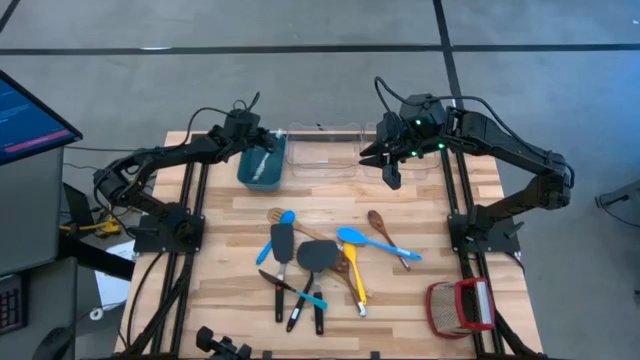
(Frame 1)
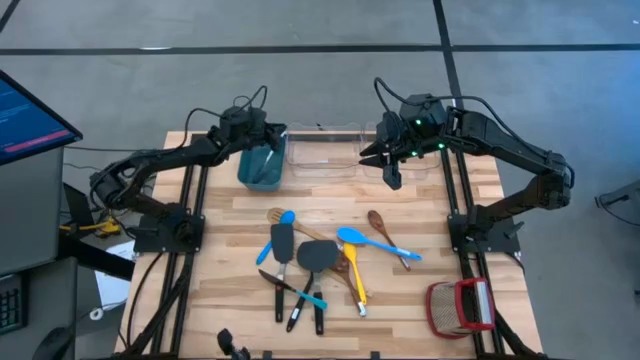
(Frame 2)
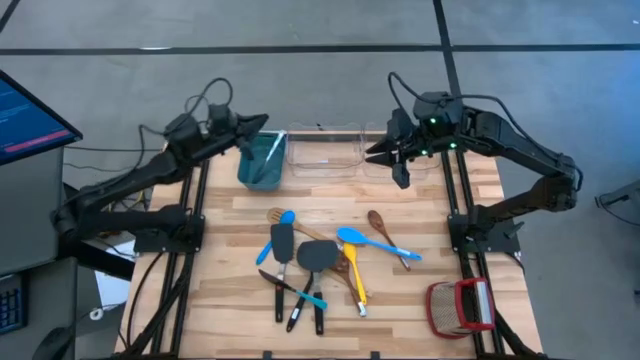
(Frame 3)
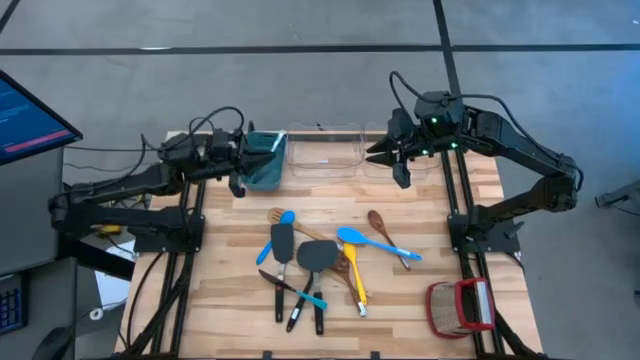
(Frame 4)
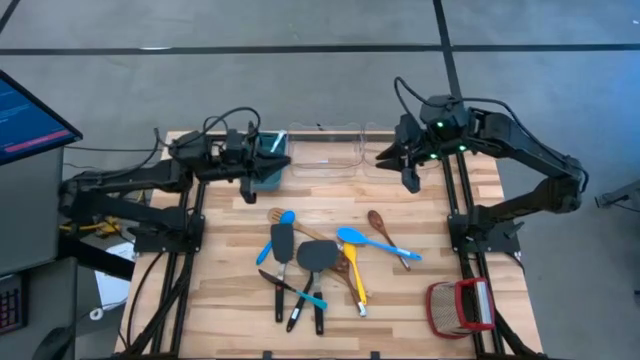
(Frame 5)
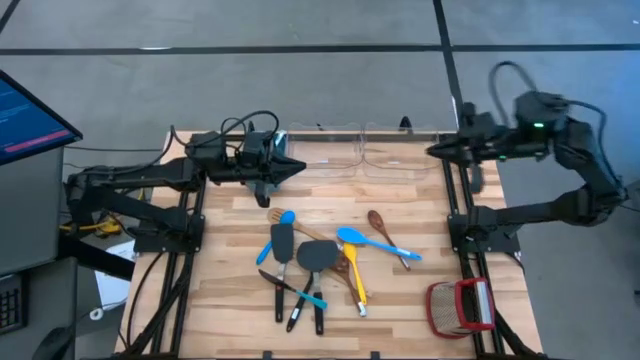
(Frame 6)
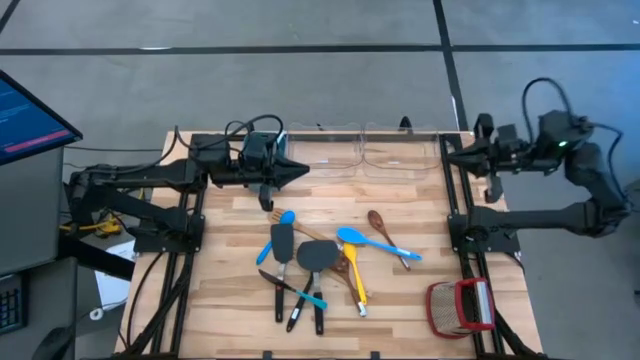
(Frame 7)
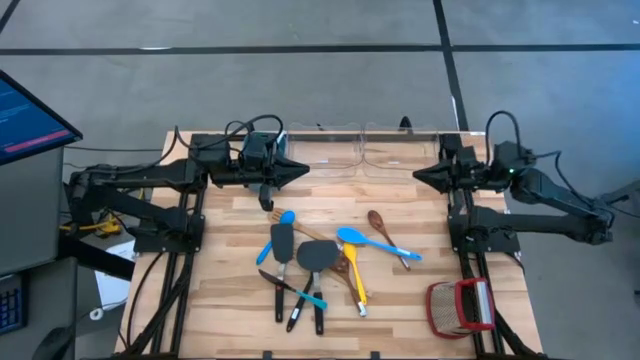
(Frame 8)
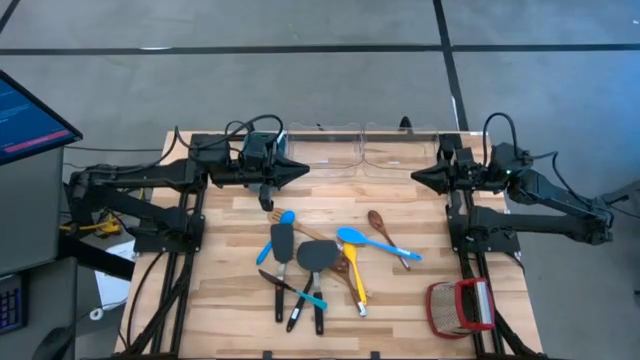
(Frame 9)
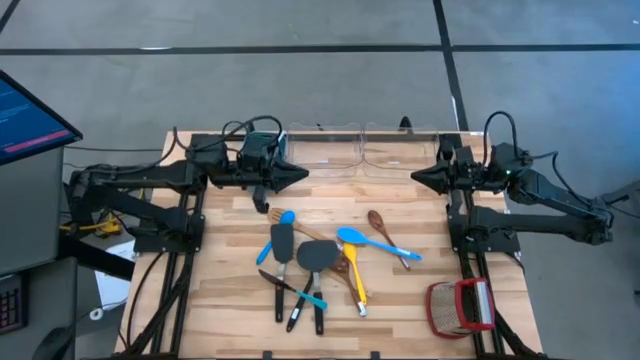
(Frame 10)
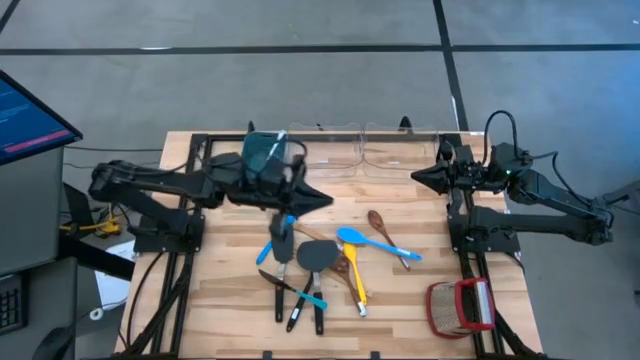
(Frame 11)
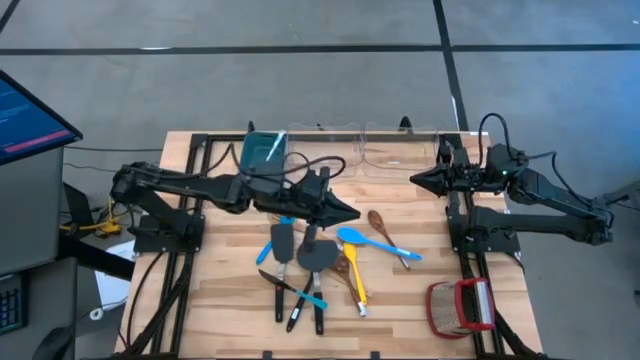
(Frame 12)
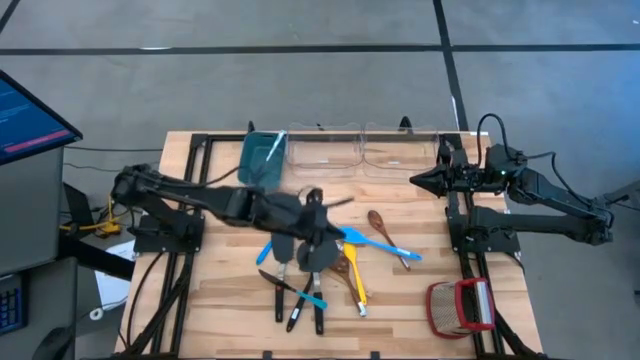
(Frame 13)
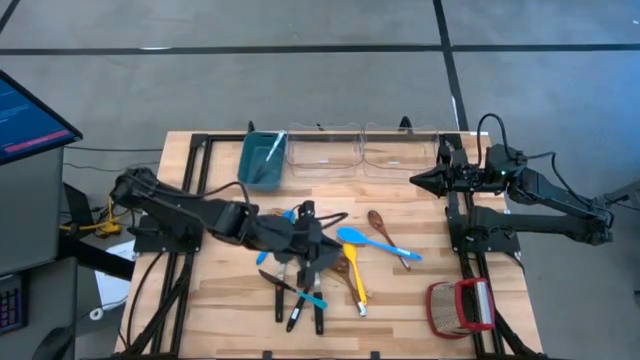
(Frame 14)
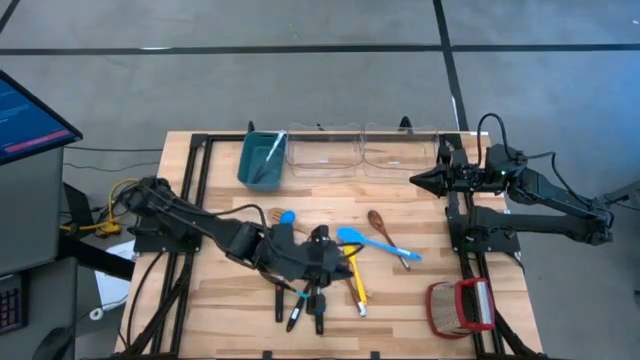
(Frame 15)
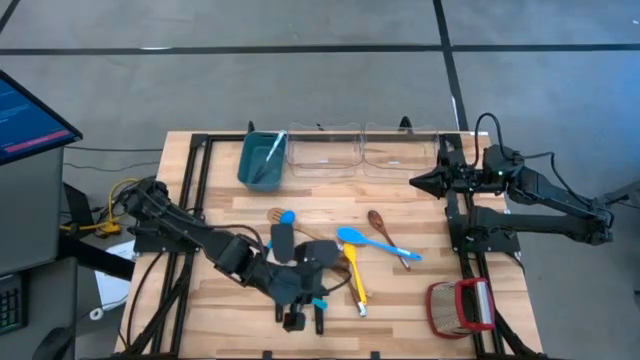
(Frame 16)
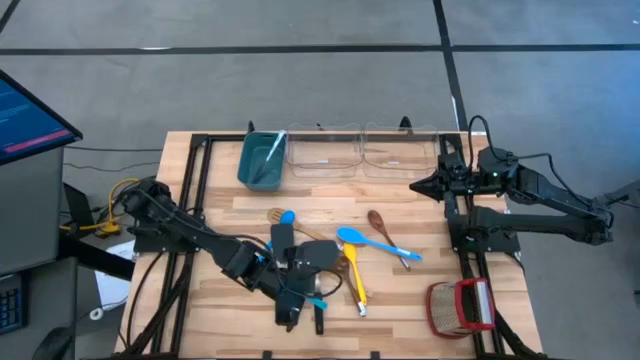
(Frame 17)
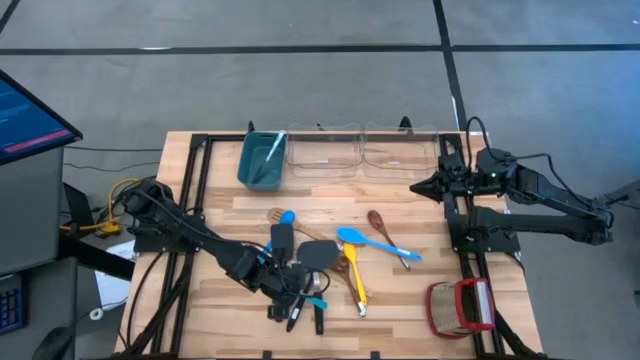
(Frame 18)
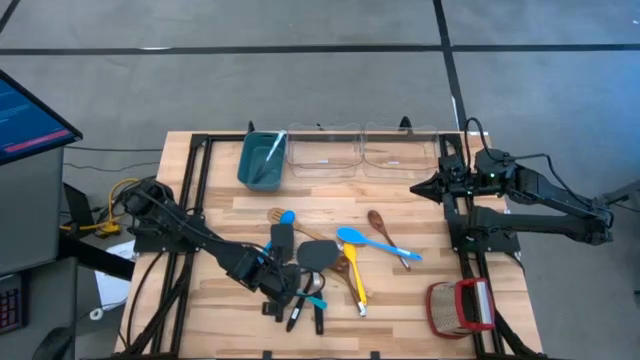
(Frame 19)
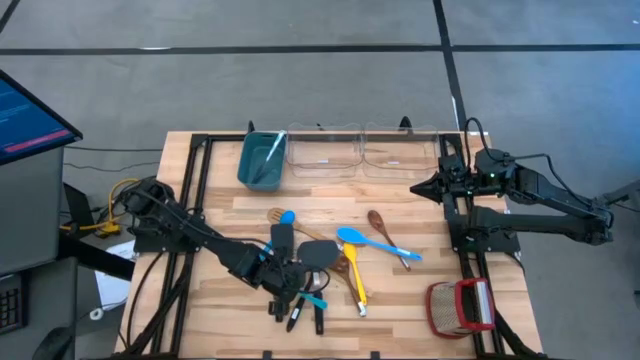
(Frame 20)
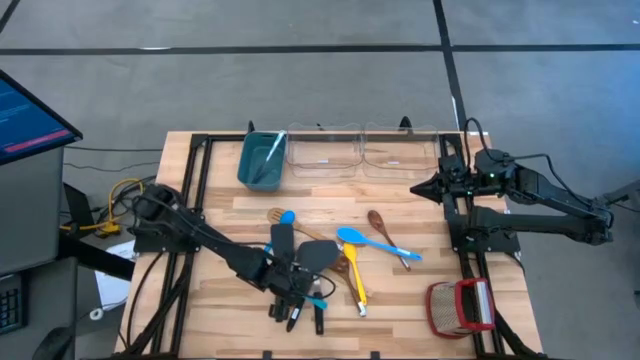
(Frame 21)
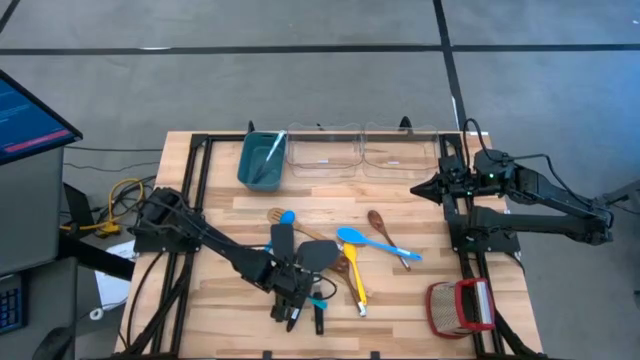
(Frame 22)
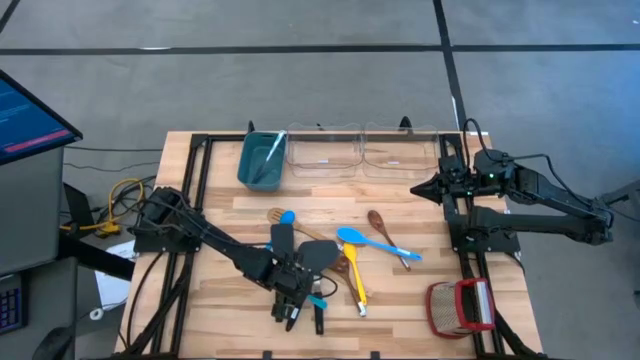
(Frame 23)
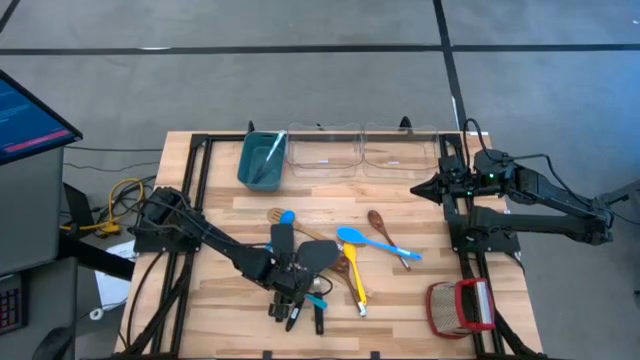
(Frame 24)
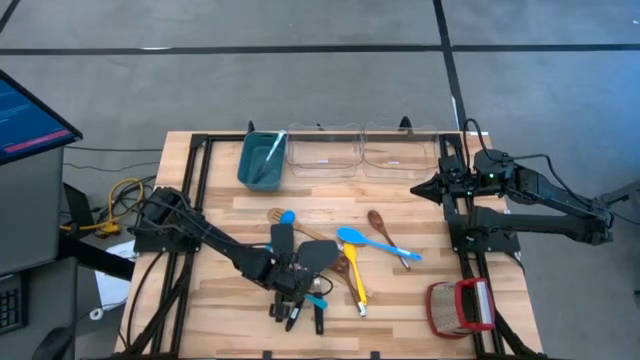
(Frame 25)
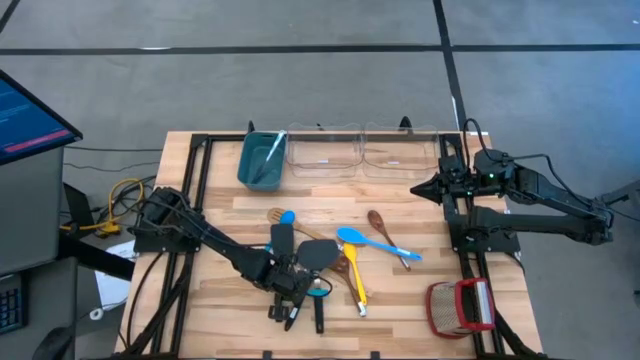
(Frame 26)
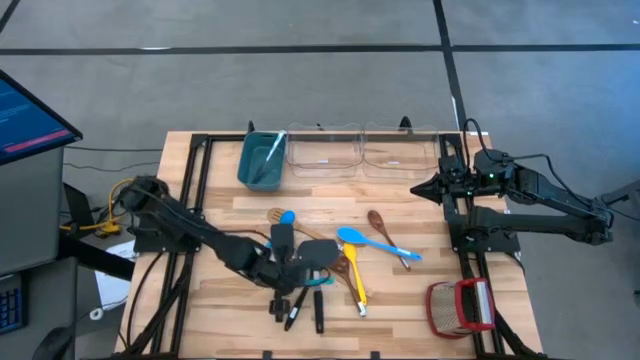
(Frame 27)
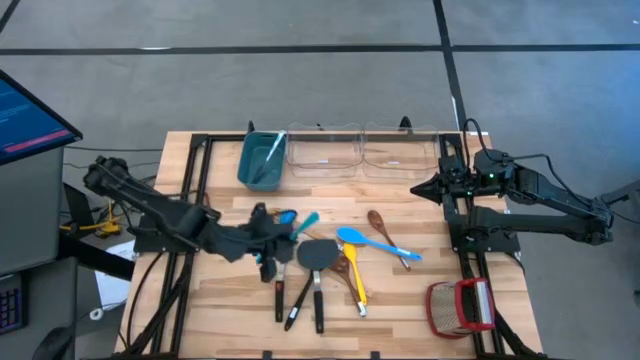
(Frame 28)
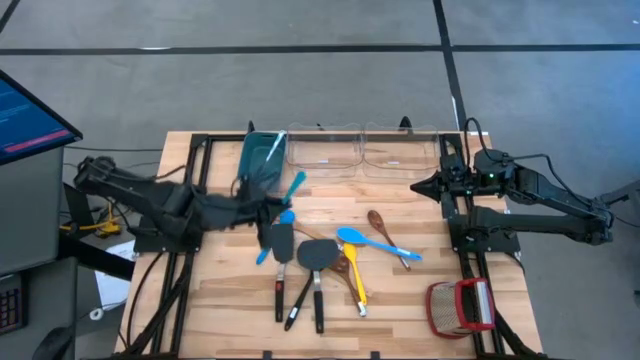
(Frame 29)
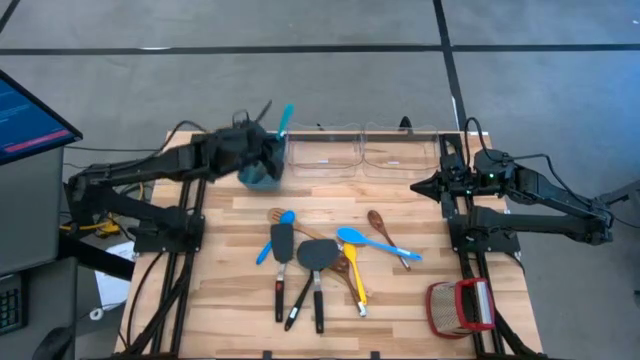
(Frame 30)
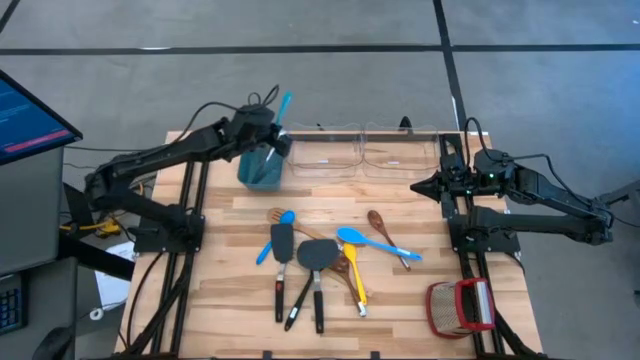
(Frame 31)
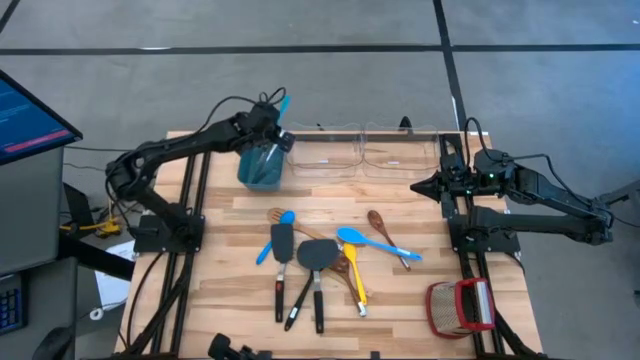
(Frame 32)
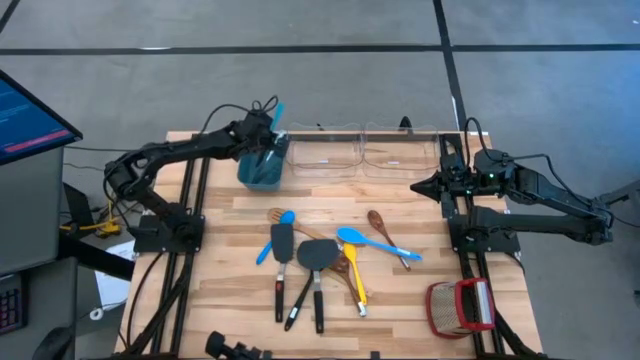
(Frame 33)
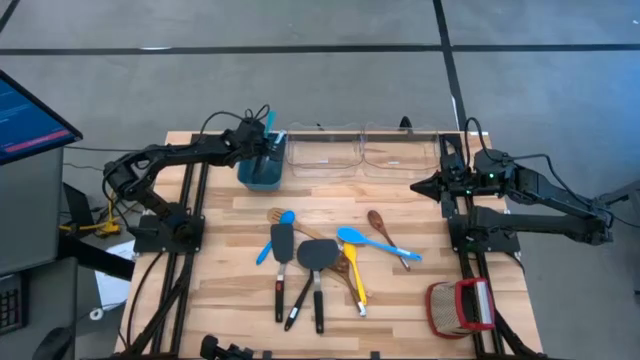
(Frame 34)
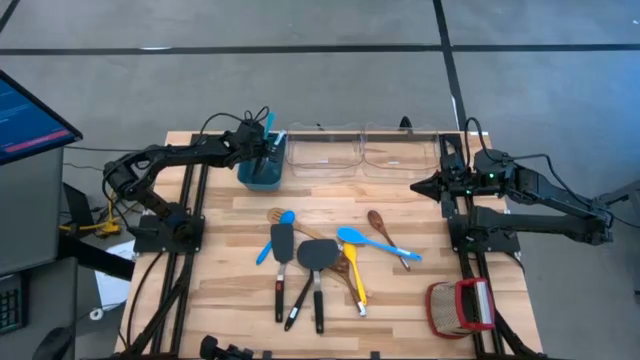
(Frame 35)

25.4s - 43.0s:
Task: Pick & Place Kitchen Items
Put the blue knife into the blue bin

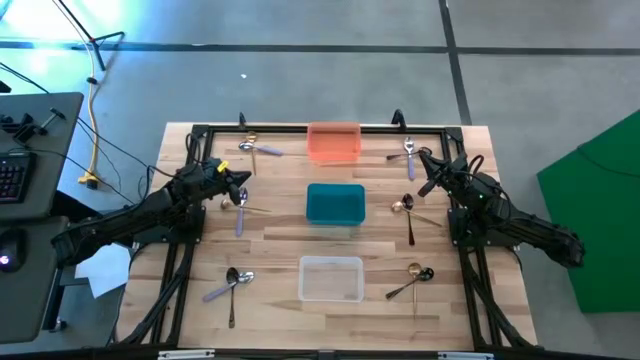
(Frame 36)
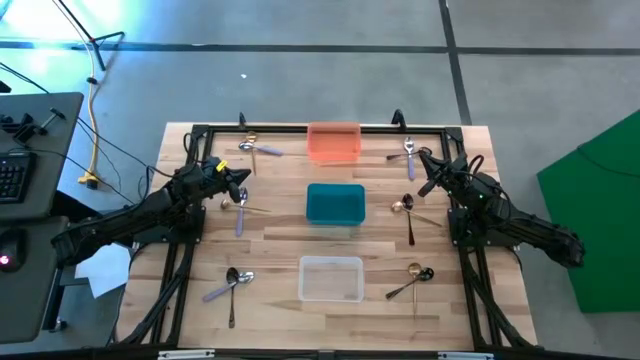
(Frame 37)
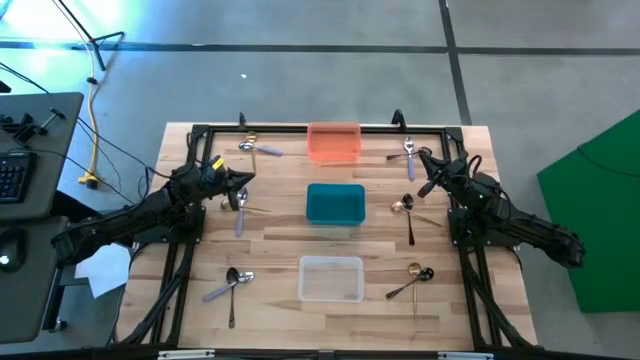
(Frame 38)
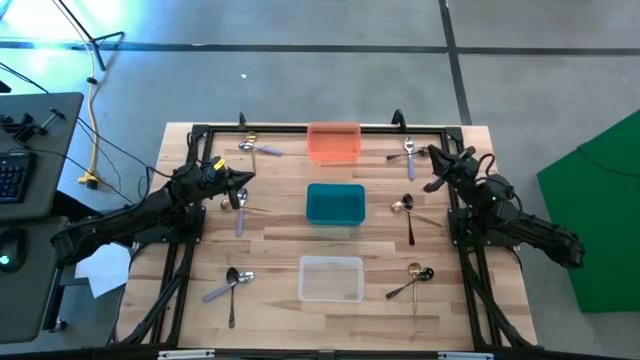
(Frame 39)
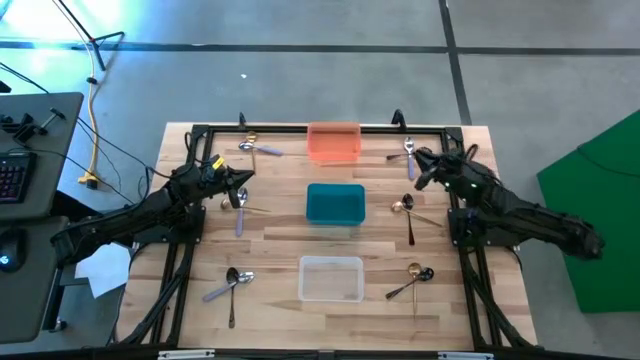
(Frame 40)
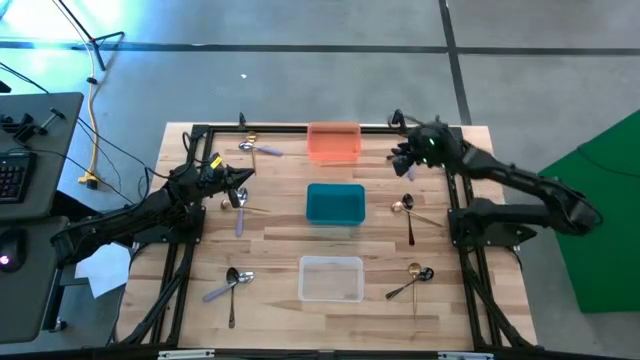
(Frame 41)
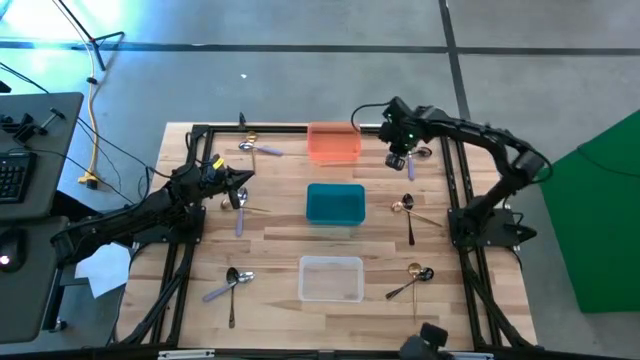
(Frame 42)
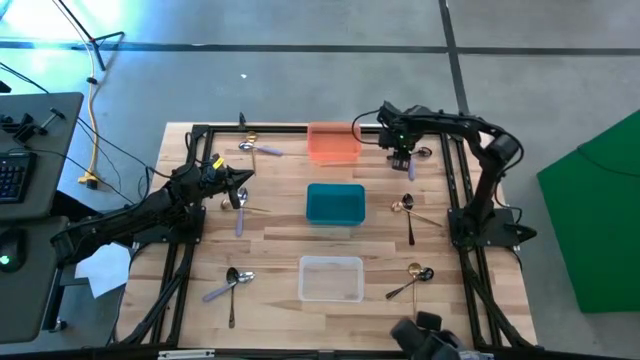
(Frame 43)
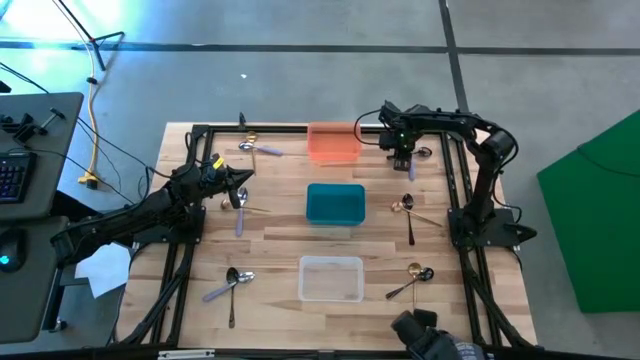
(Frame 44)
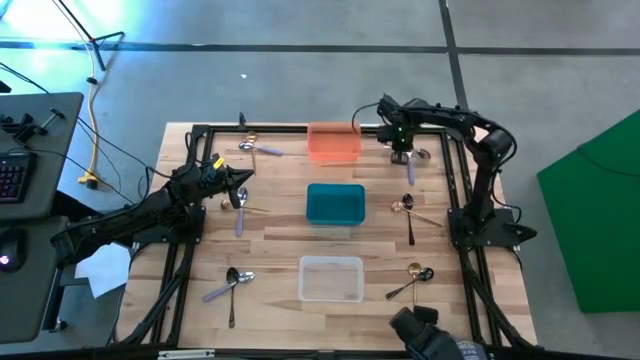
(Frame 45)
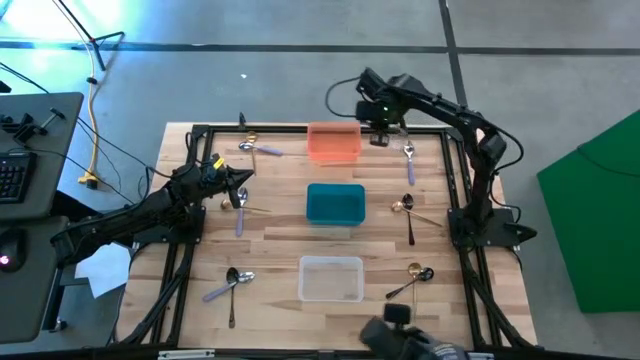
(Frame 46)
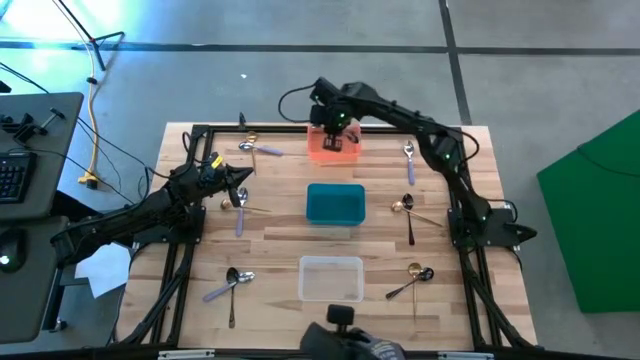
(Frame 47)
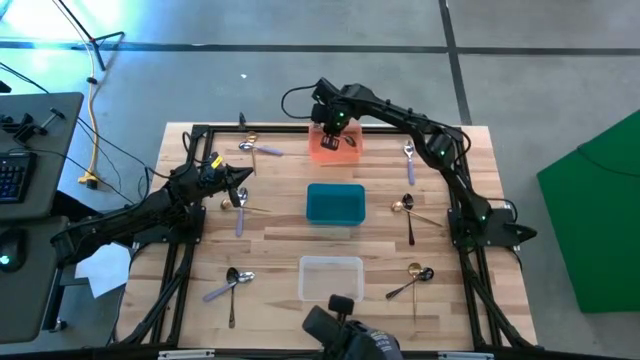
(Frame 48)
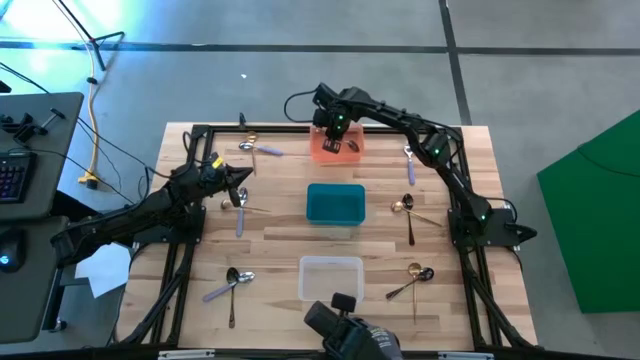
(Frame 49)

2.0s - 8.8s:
Task: Sort silverware by color (type)
Put the black spoon into the orange bin
